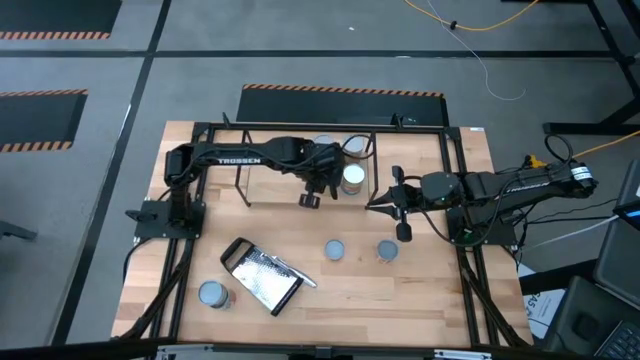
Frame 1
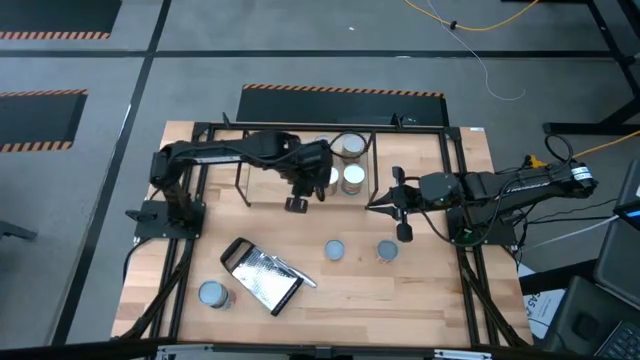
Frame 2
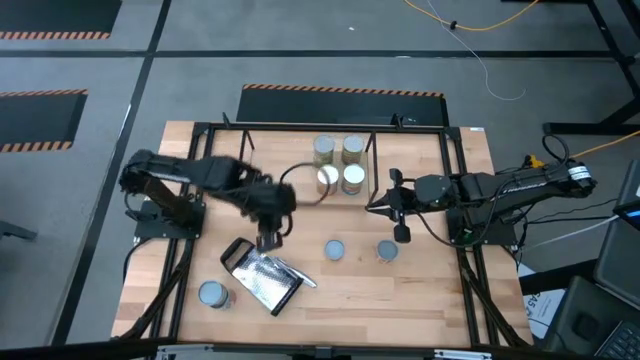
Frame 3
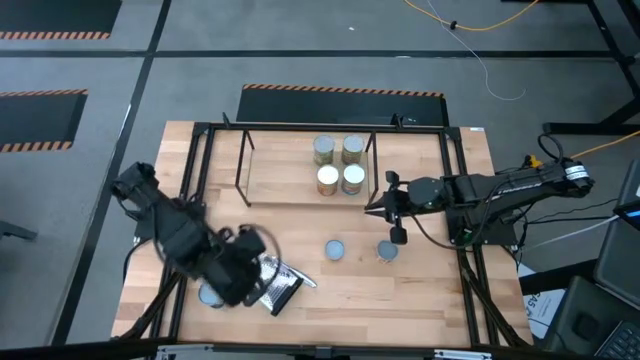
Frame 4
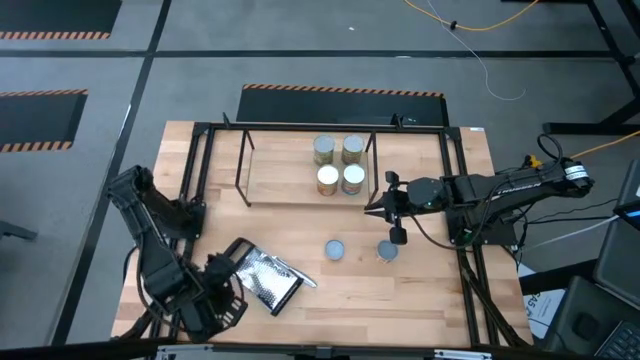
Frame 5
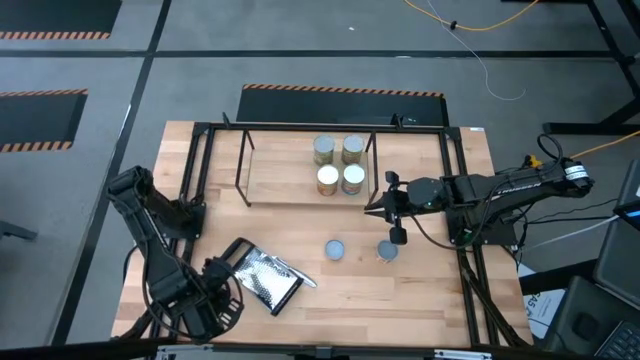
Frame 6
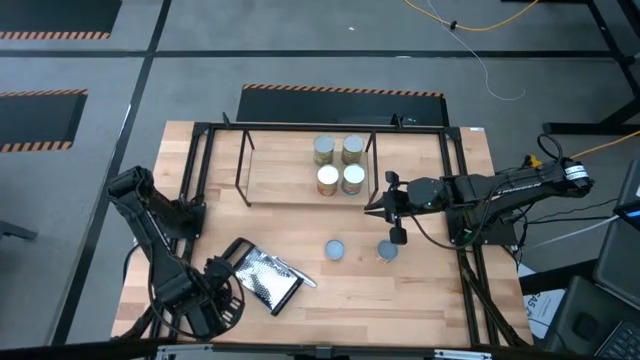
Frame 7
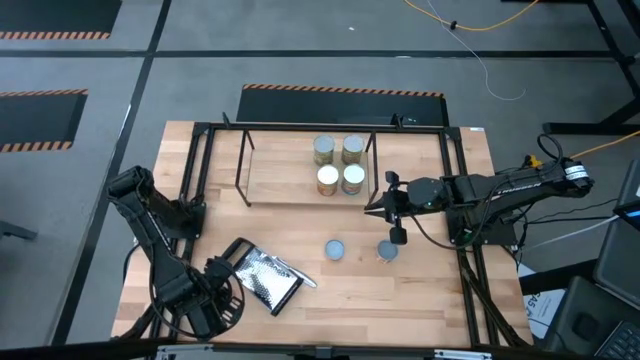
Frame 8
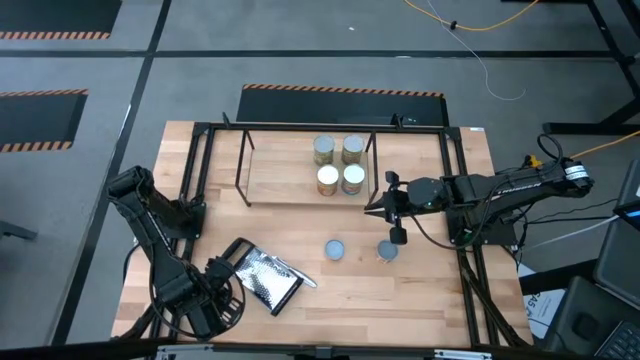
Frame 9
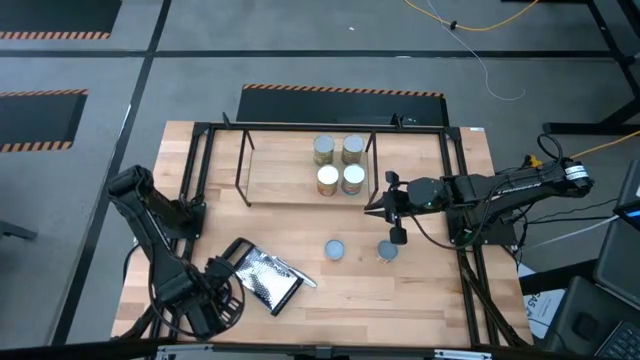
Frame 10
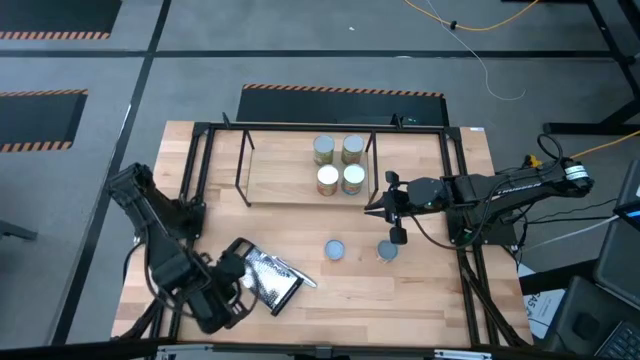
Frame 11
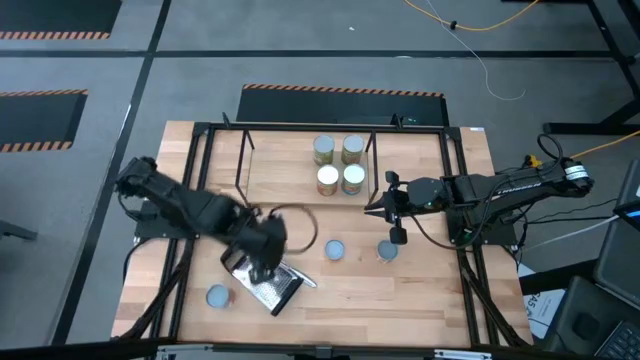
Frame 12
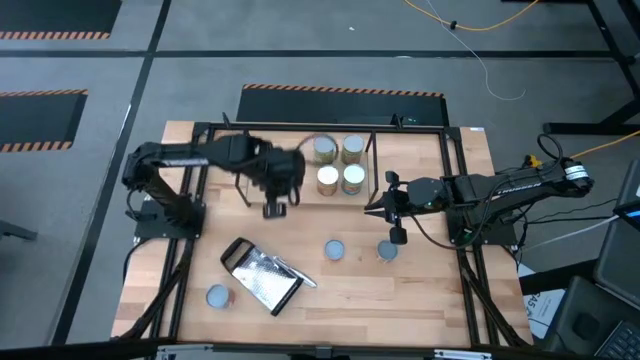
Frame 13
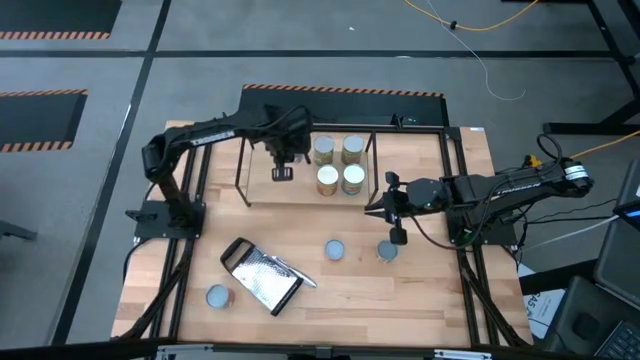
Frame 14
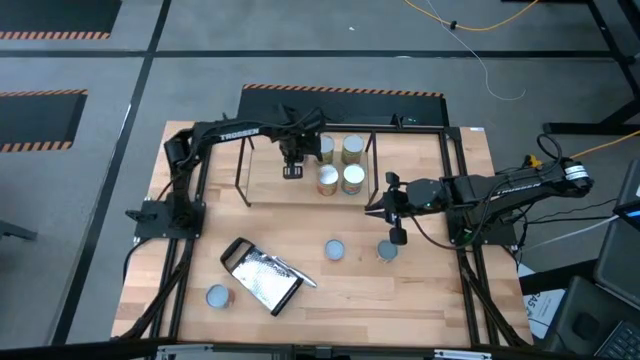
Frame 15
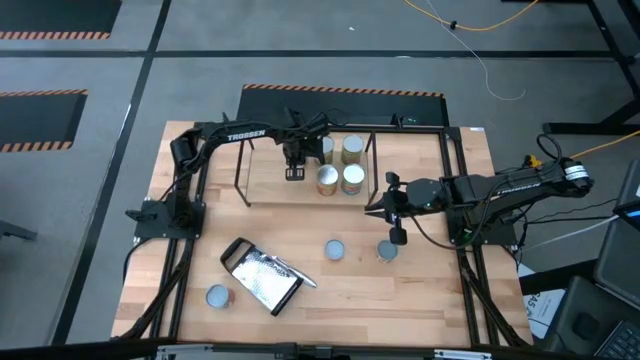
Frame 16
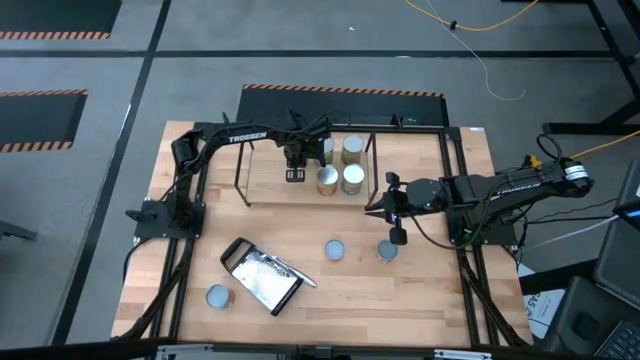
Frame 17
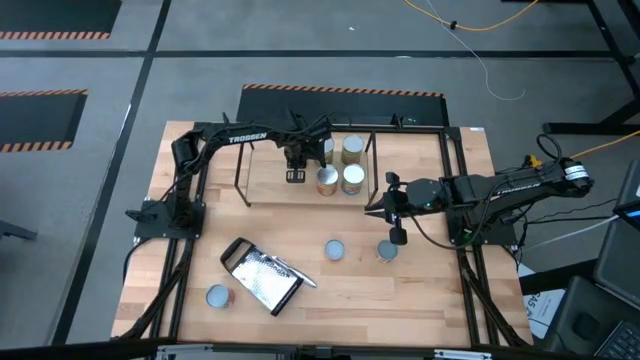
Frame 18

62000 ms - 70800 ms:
Task: Pick and place cans onto a shelf
Put the canned mandarin orange on the shelf

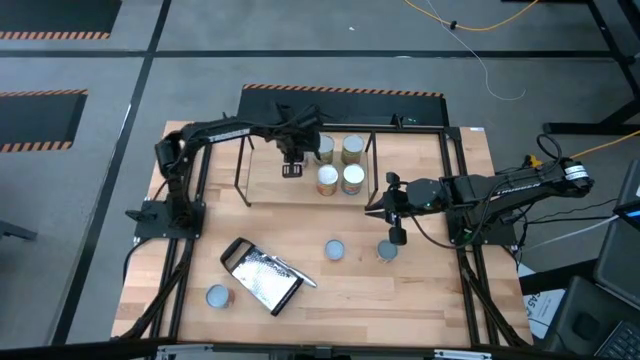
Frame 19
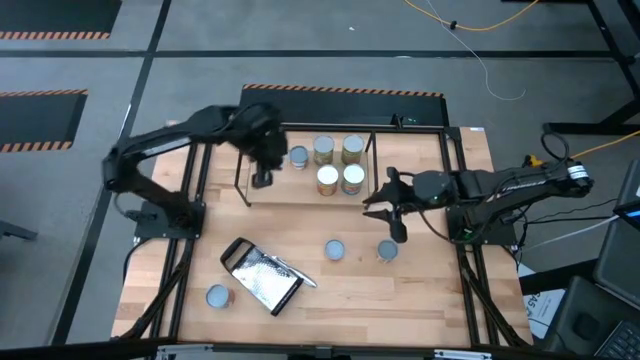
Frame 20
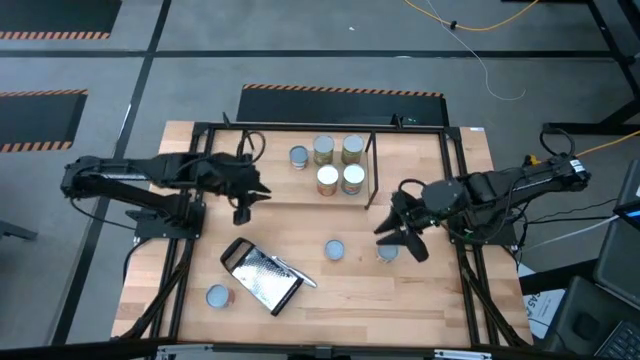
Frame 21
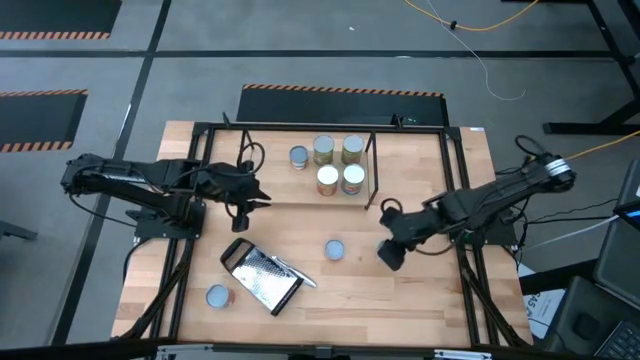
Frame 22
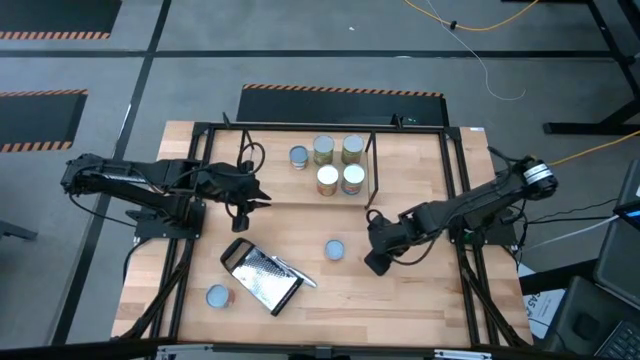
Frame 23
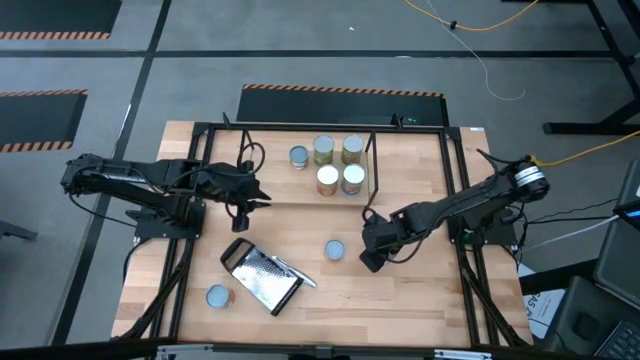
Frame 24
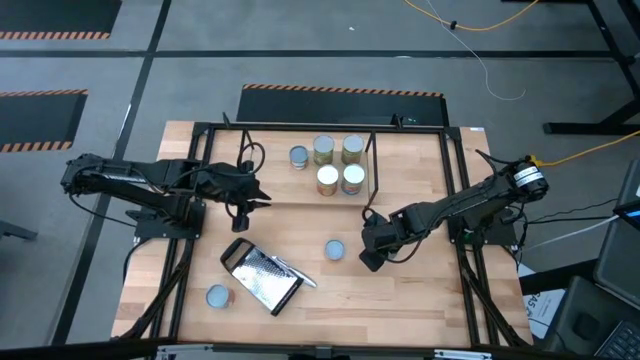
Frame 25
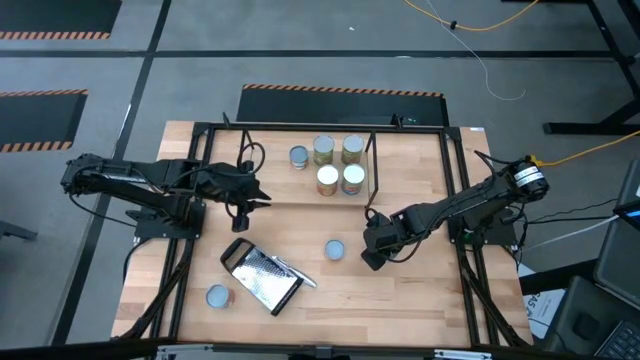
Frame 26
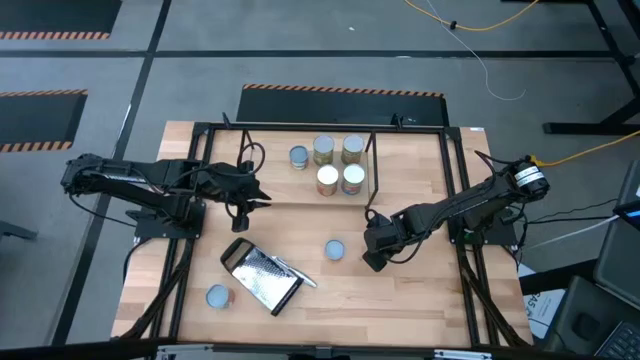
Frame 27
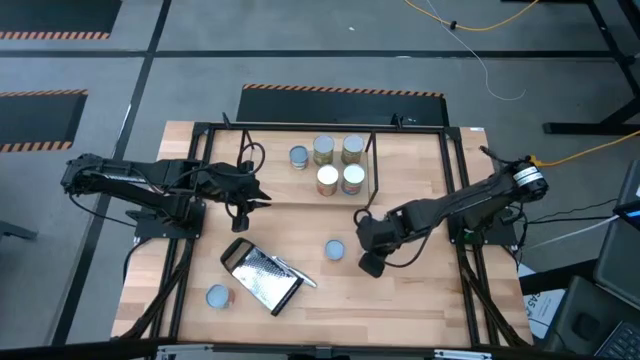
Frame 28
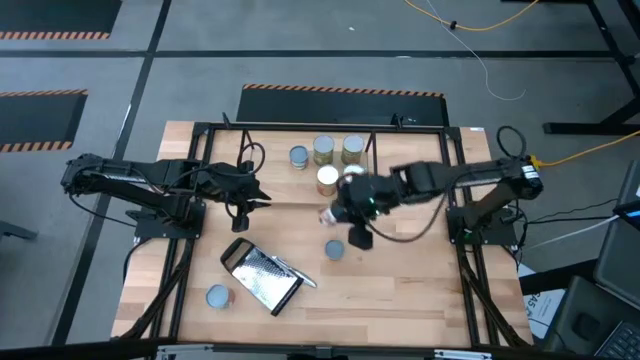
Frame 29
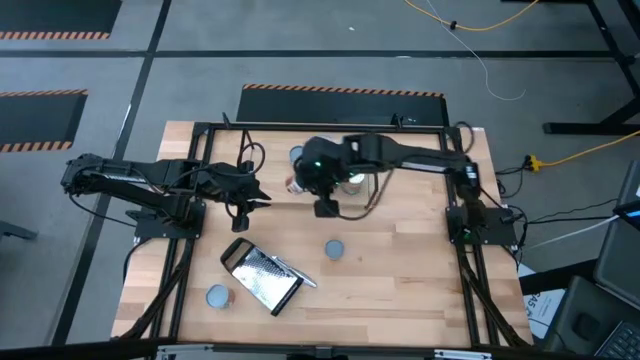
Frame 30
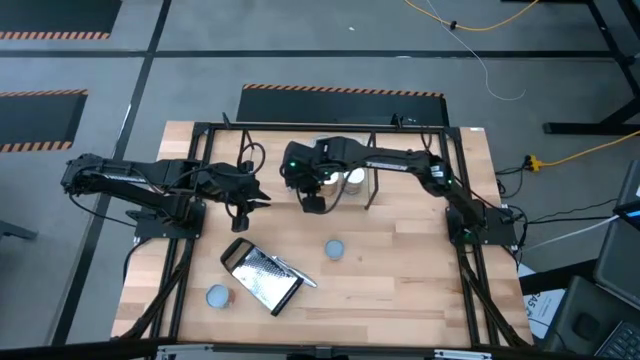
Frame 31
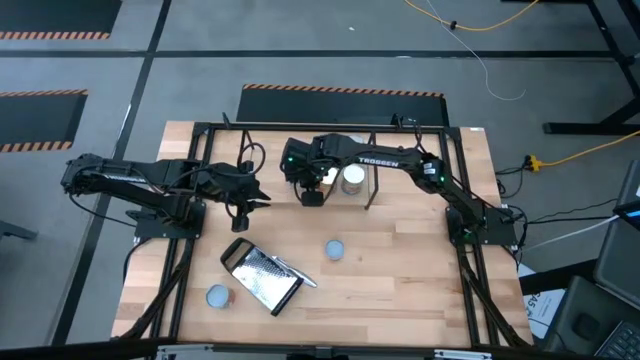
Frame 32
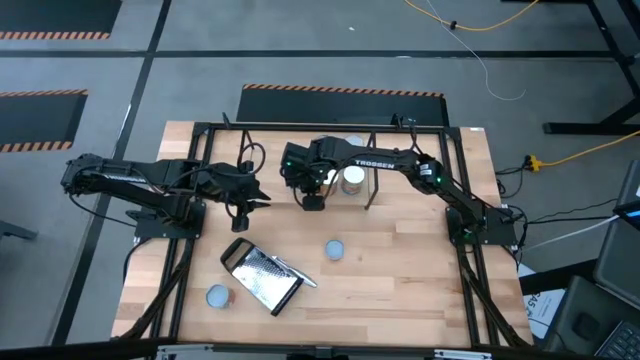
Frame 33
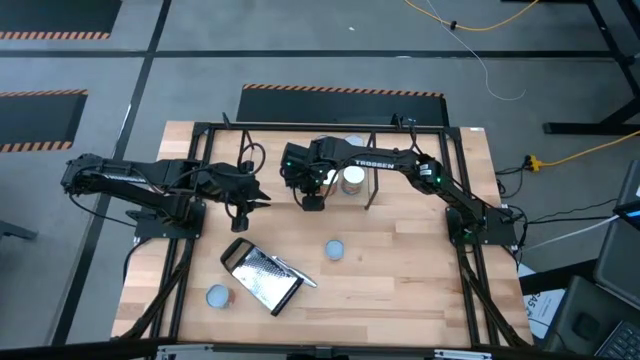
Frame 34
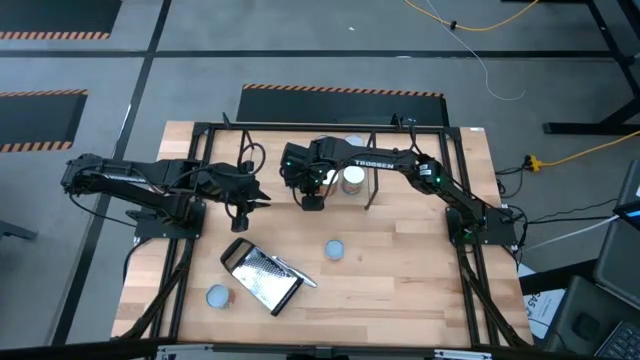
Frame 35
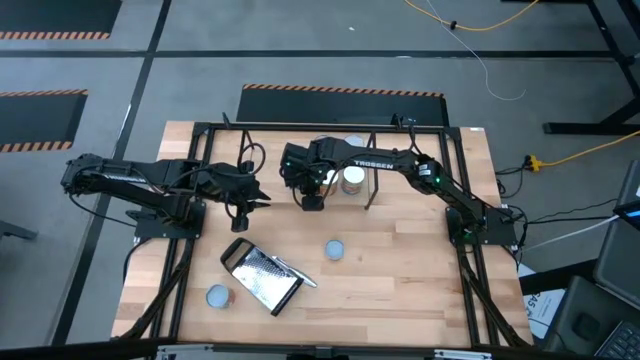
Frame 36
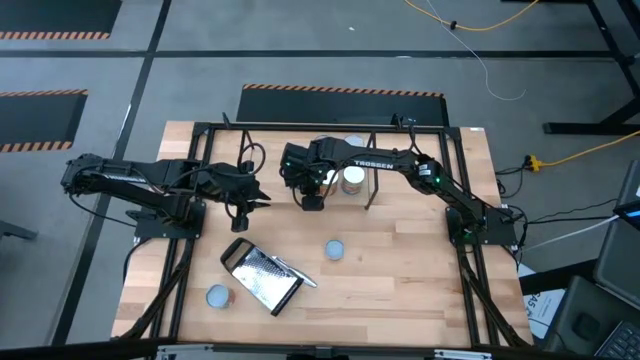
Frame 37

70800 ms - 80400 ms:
Put the canned diced tomatoes on the shelf

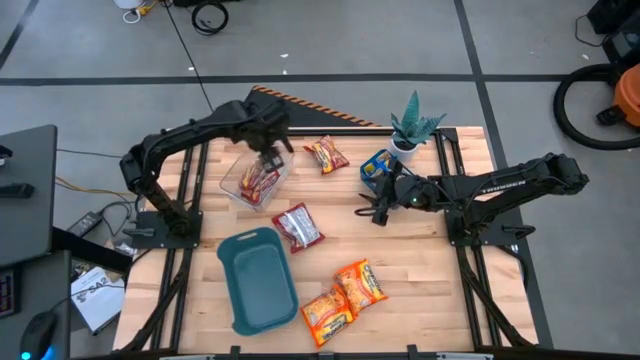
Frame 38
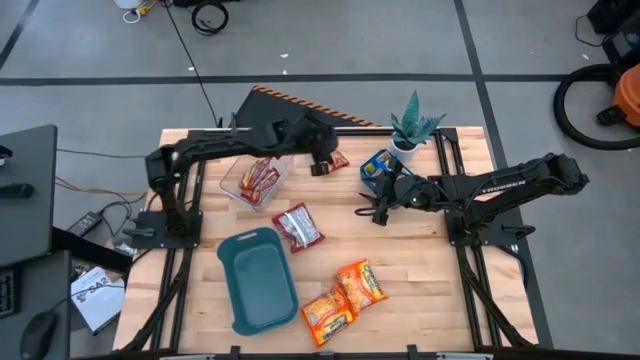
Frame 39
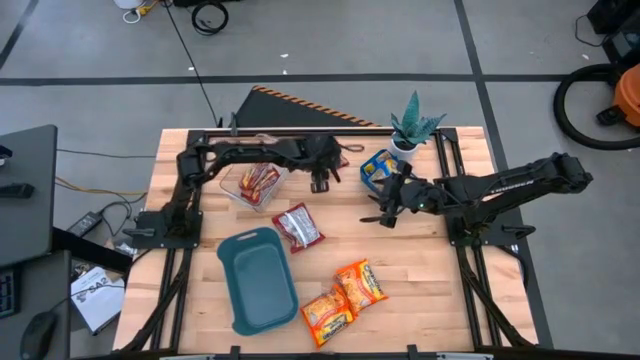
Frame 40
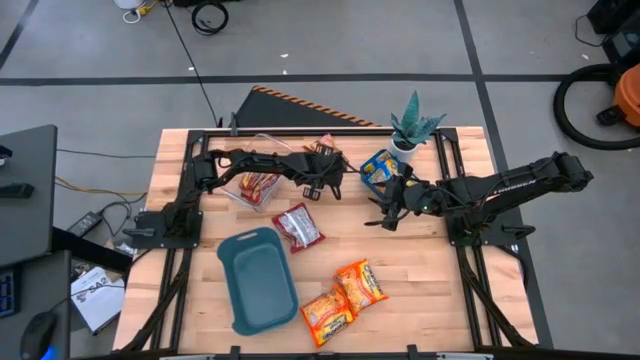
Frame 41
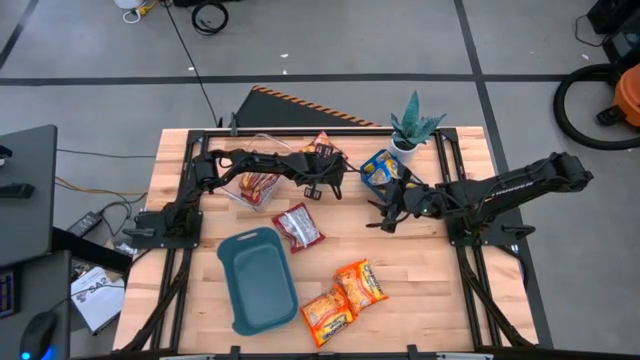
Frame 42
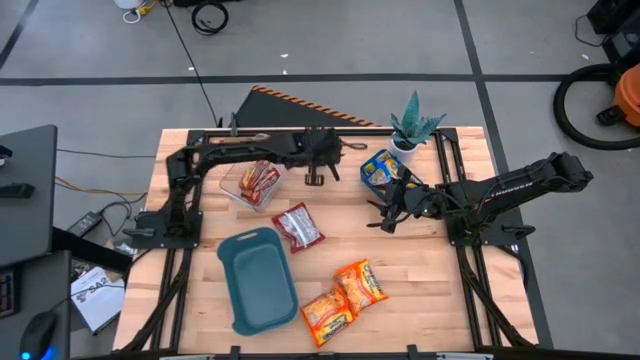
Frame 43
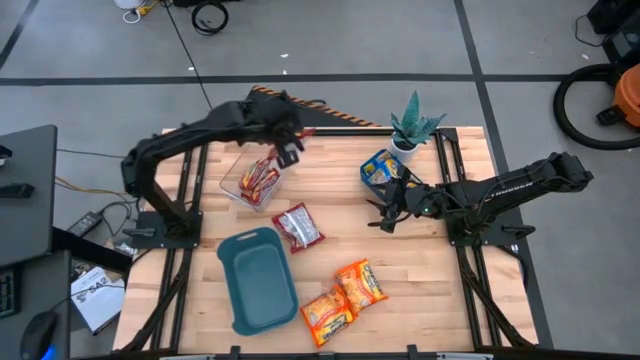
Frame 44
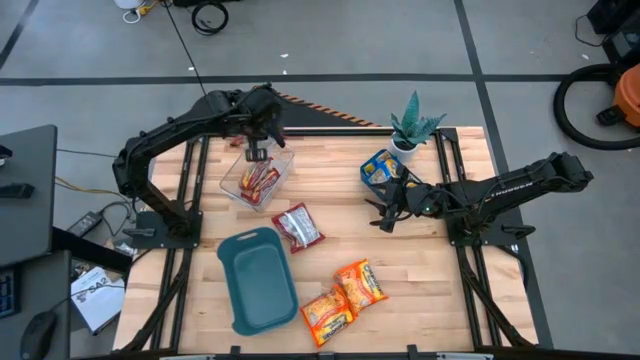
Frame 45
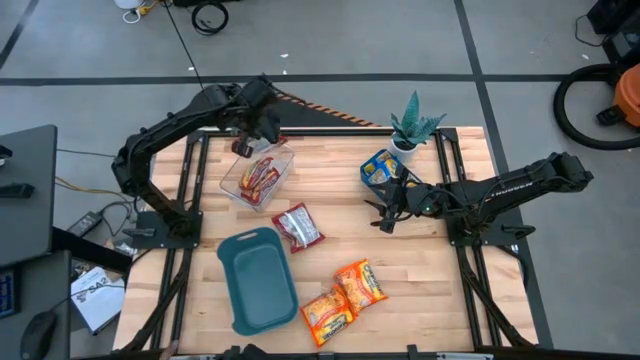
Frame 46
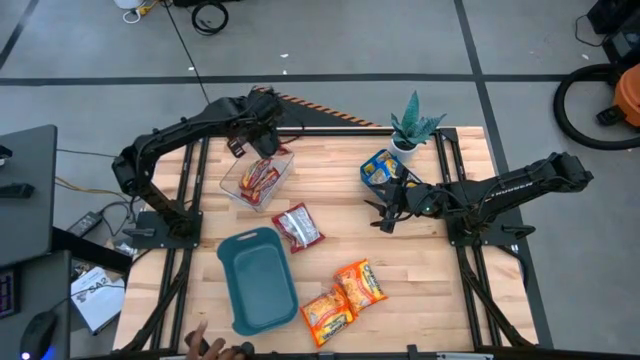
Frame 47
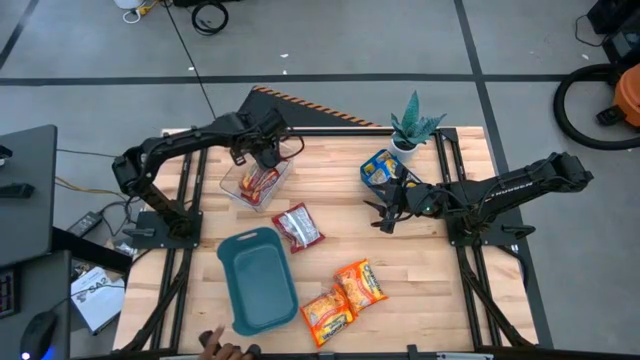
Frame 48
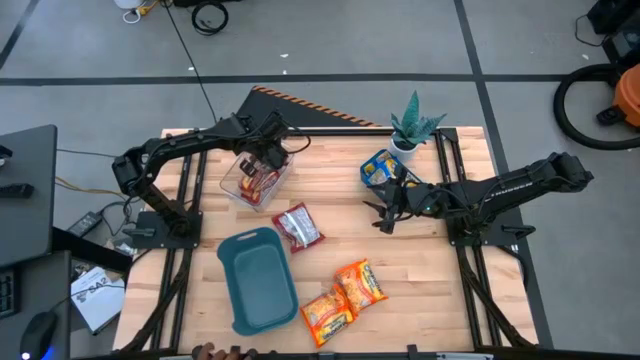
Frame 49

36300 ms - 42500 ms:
Task: Sort Maruchan noodles
Put the red noodle pack into the transparent bin
